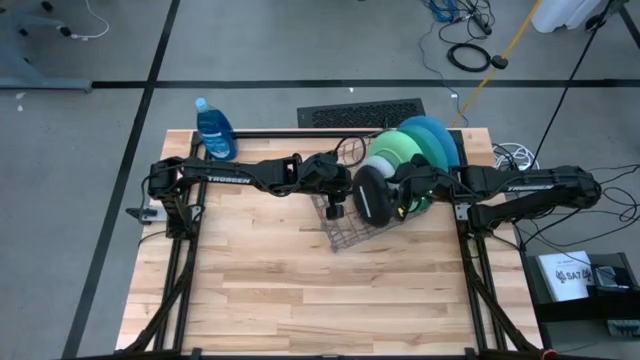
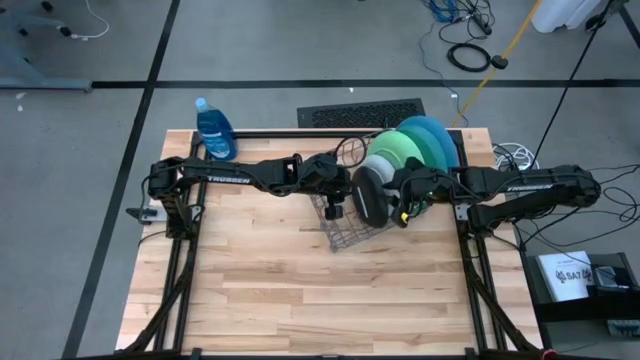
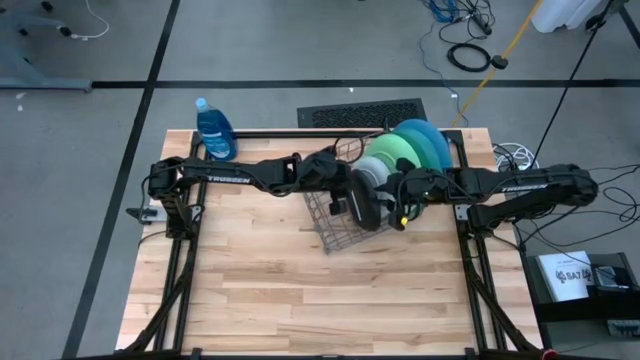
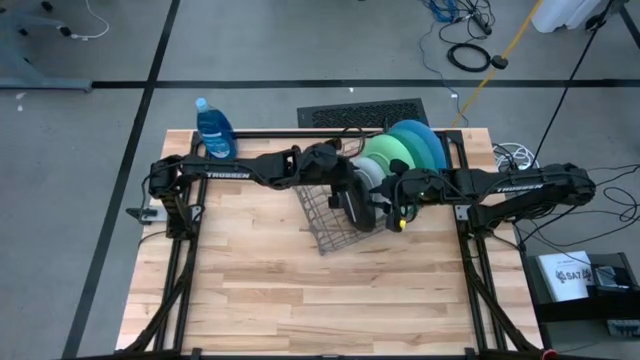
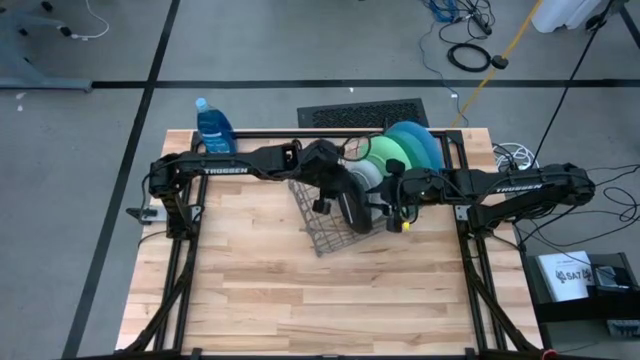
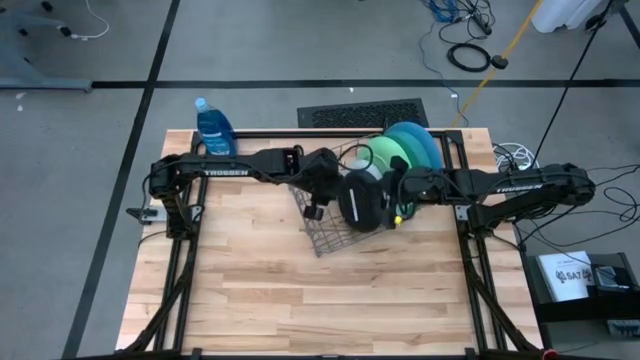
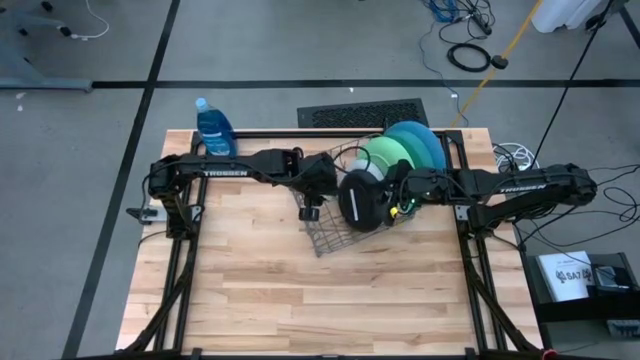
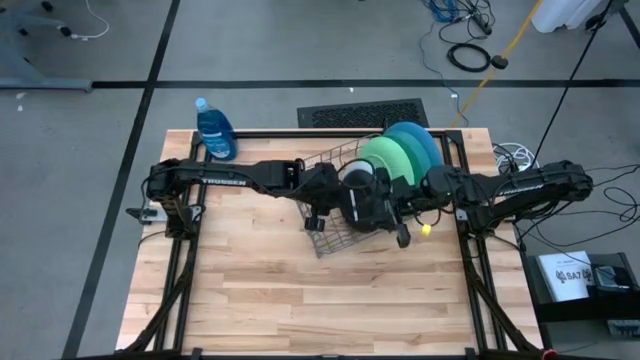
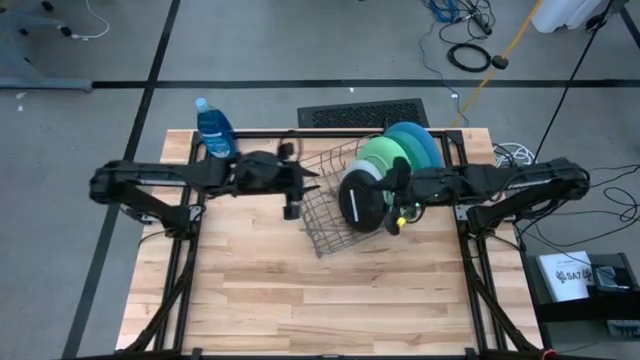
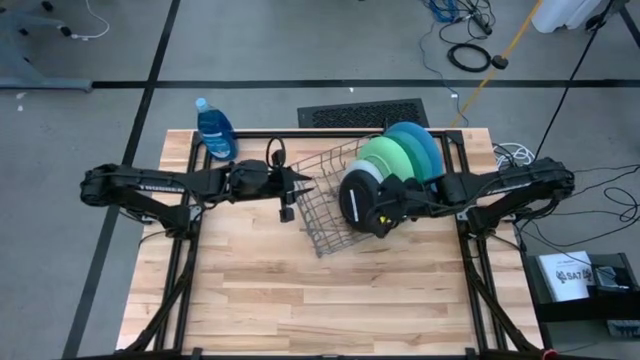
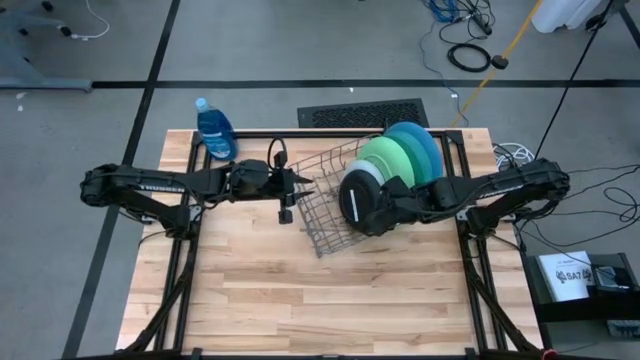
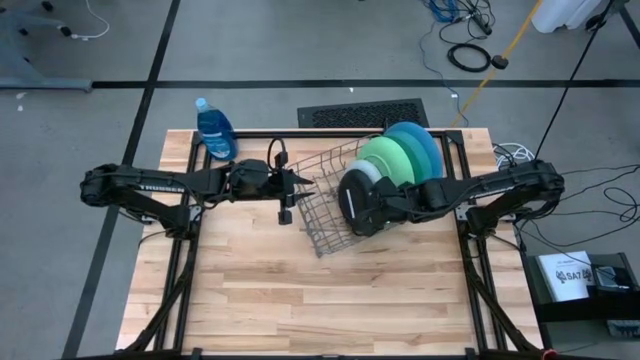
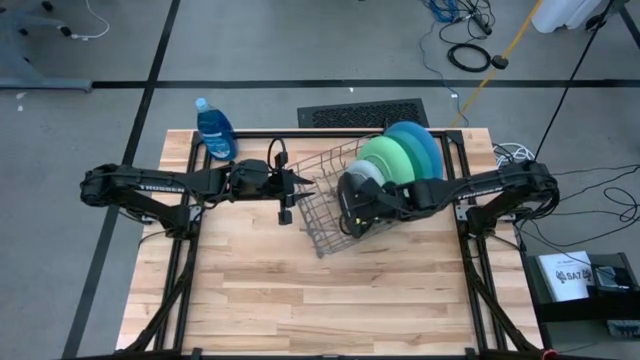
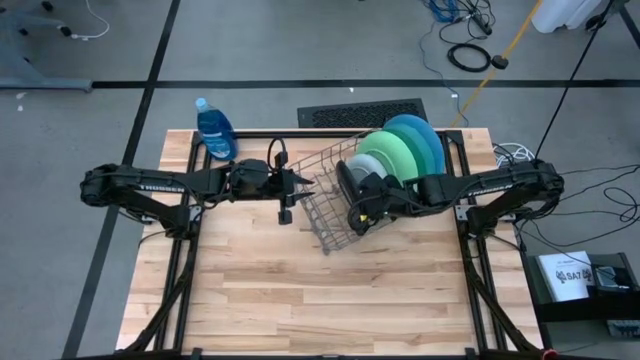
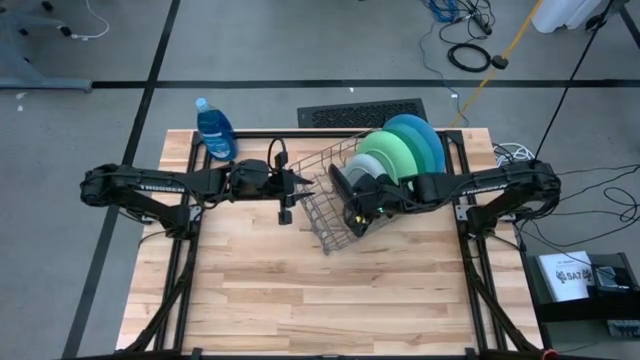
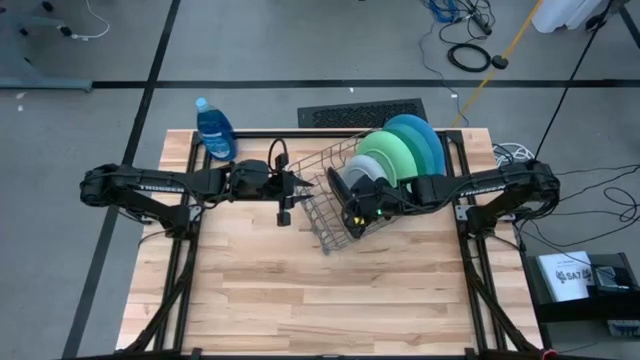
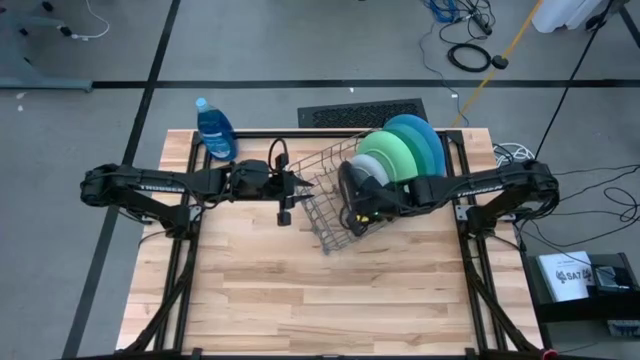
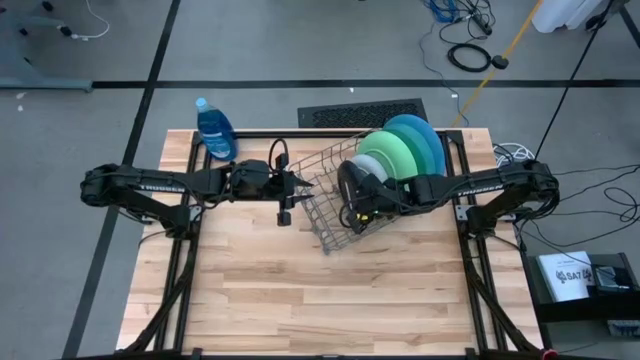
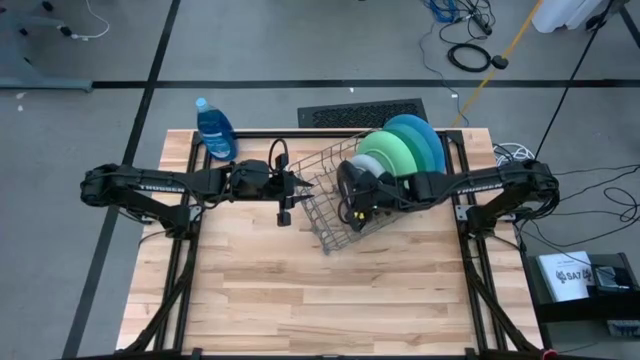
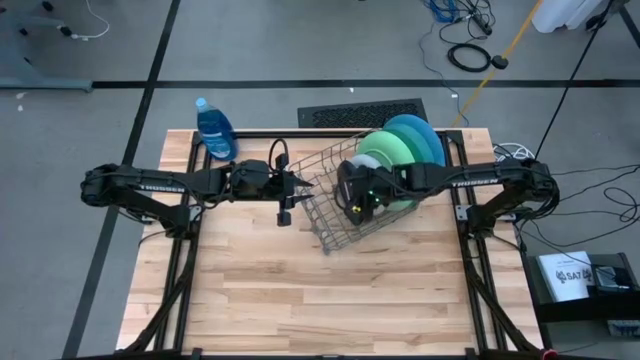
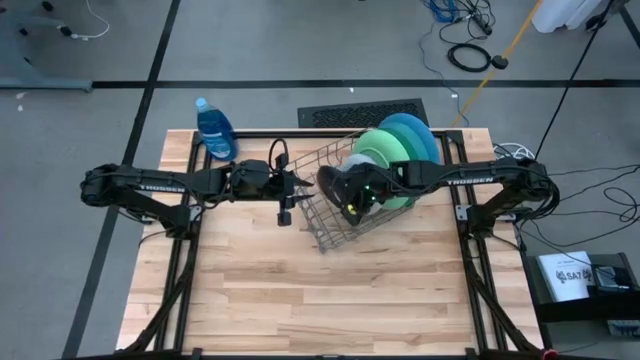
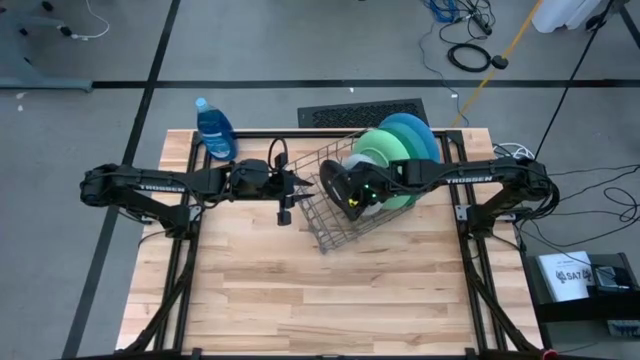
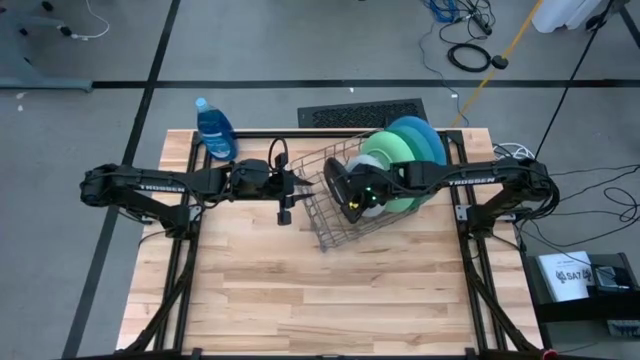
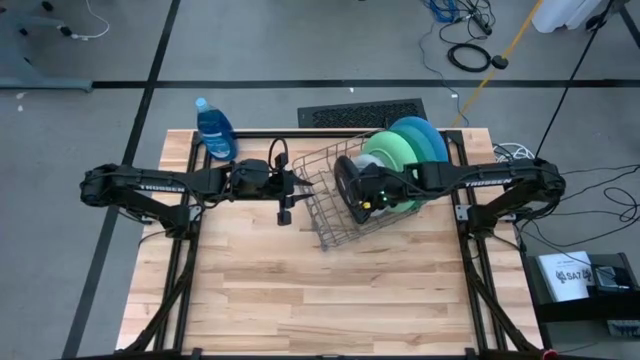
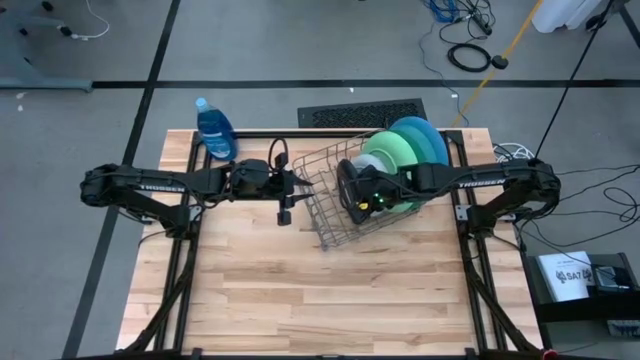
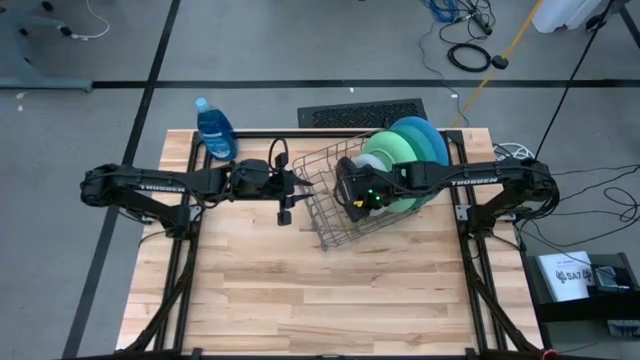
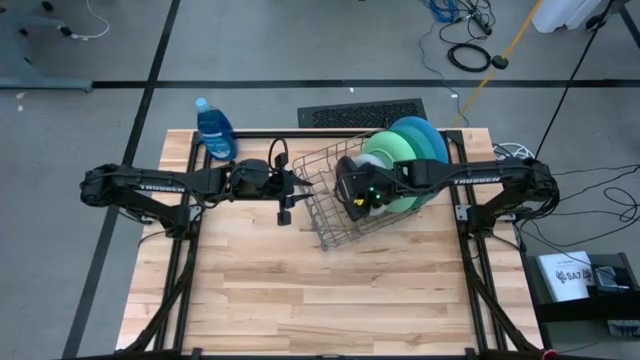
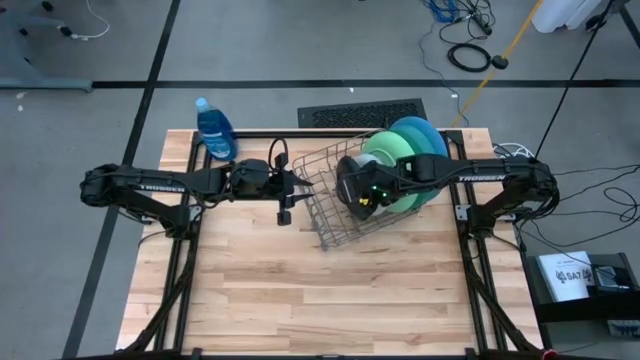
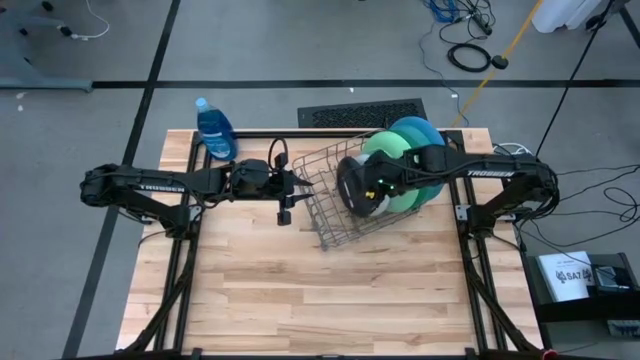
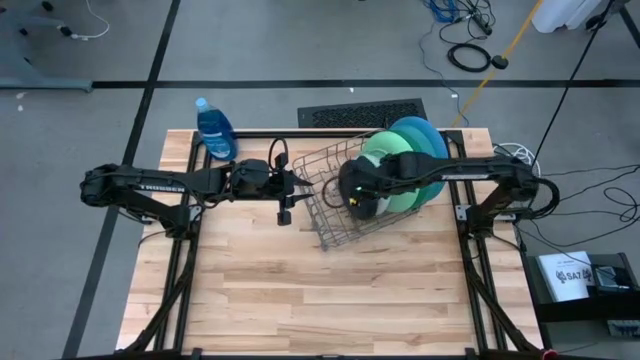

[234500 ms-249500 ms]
Task: Sort dishes
Put the black plate into the dish rack

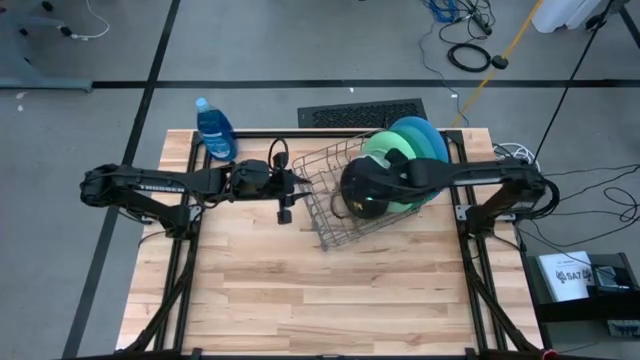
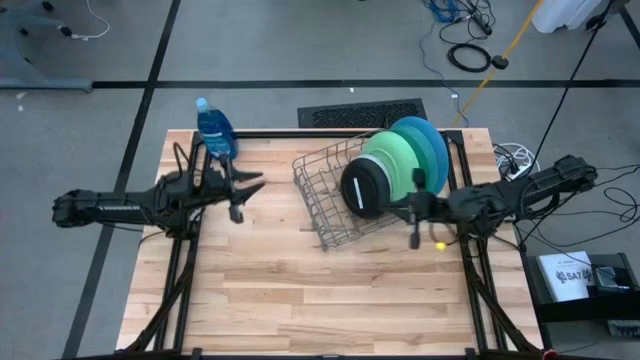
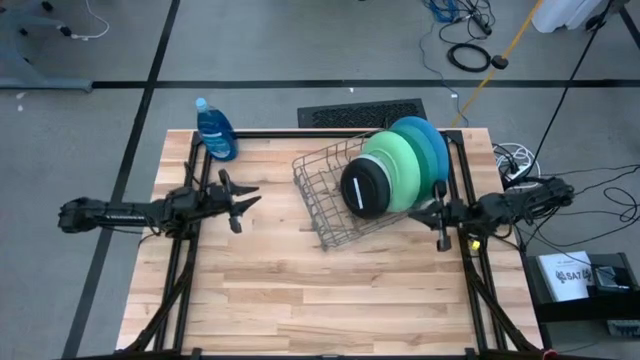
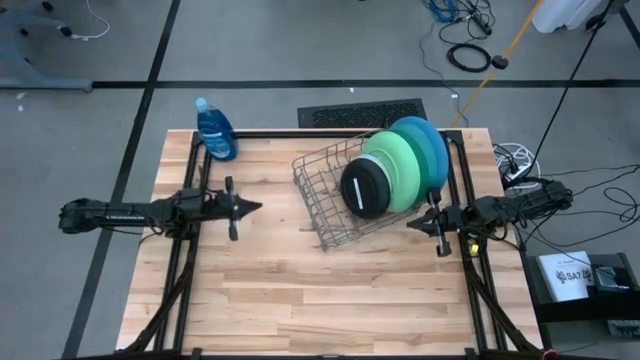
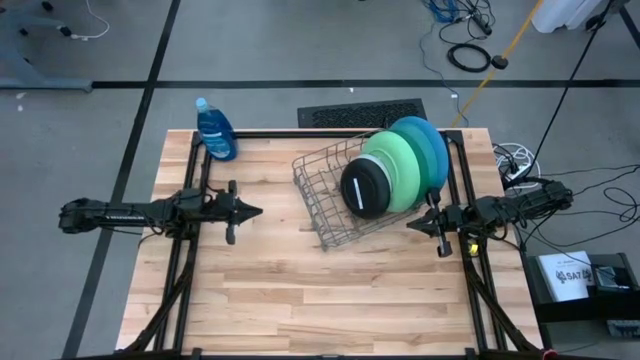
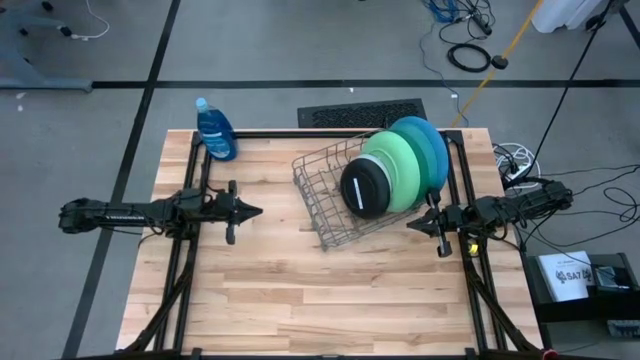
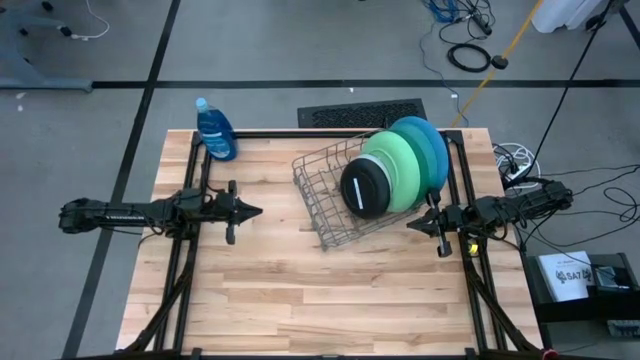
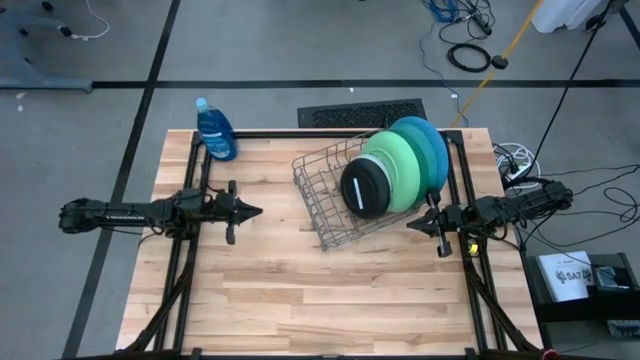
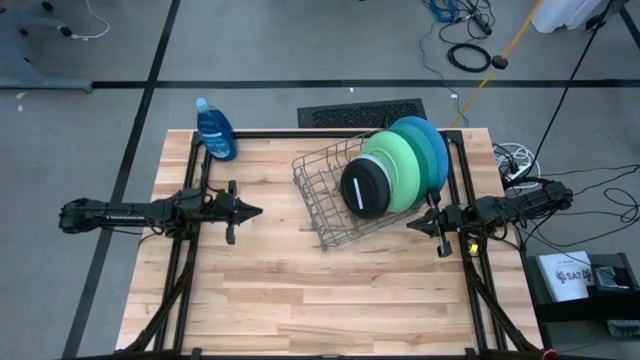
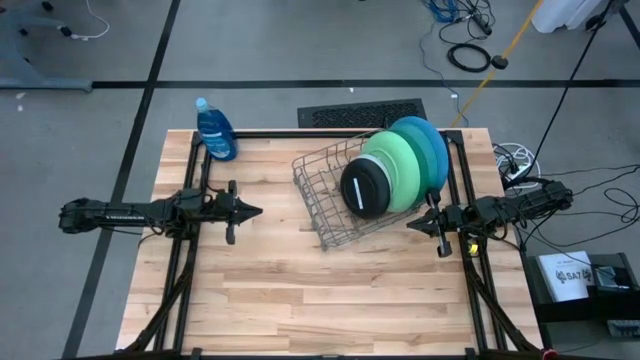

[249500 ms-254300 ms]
Return to Home Position
